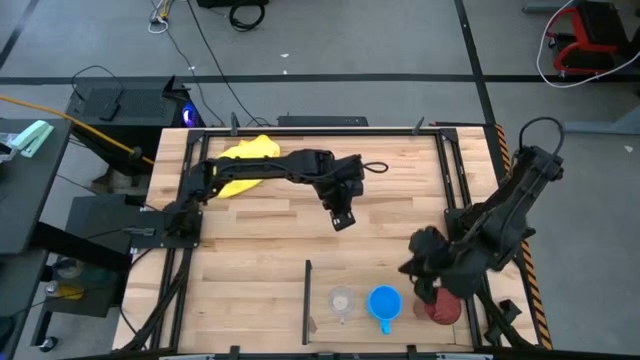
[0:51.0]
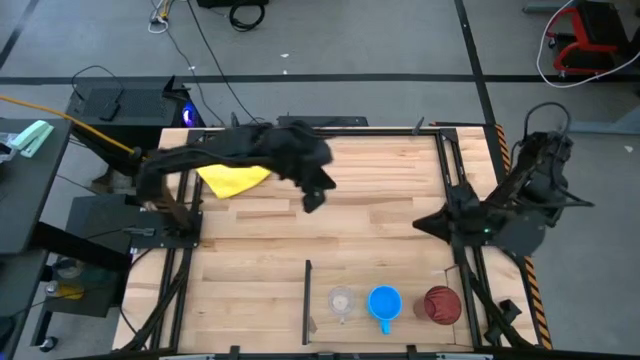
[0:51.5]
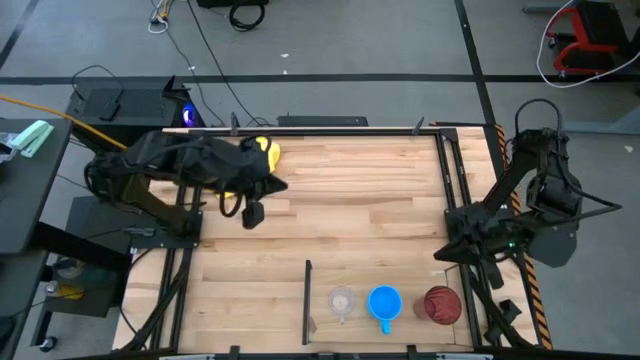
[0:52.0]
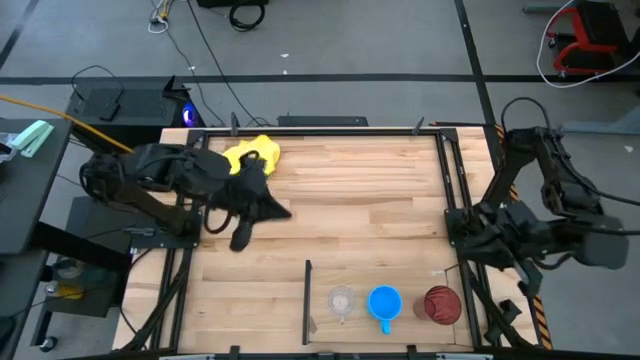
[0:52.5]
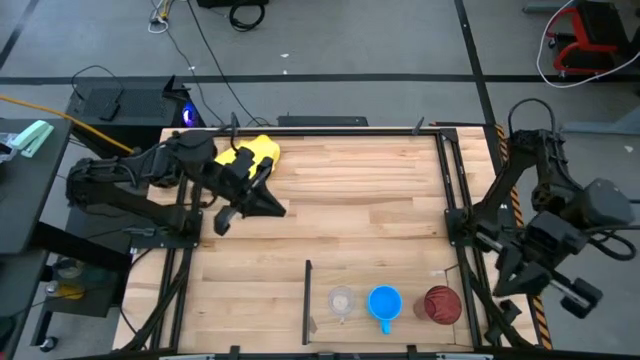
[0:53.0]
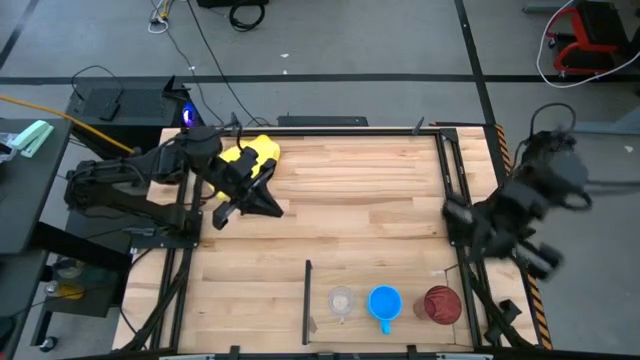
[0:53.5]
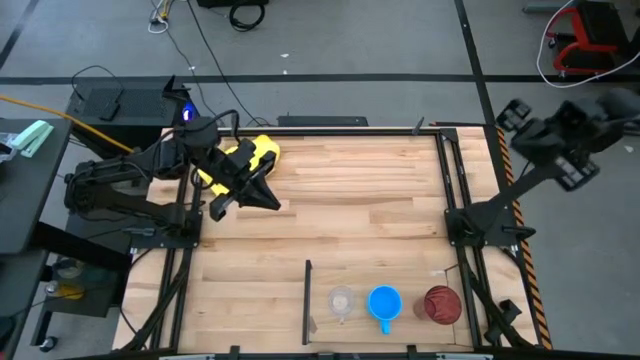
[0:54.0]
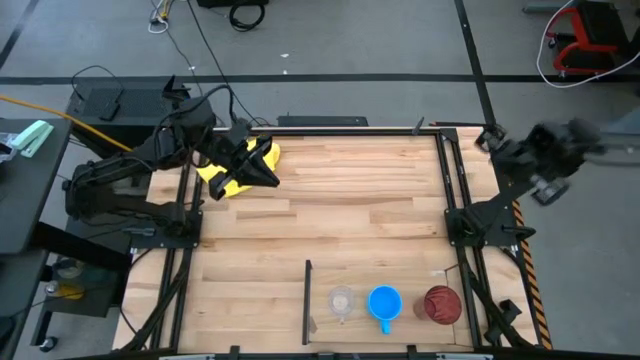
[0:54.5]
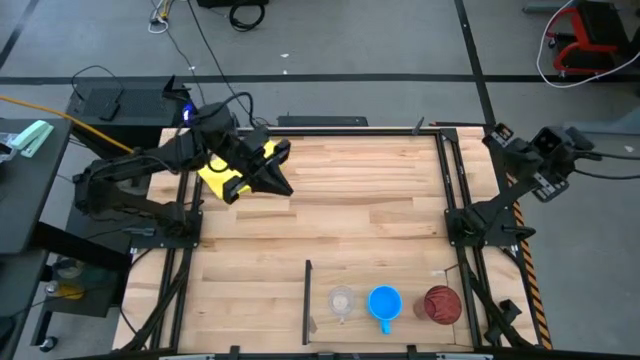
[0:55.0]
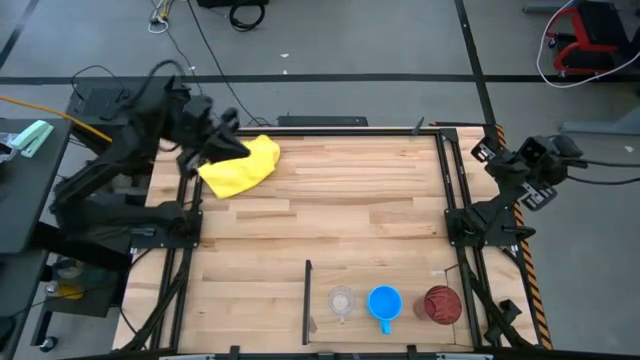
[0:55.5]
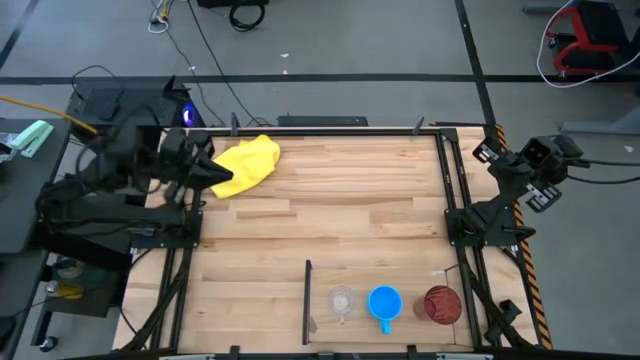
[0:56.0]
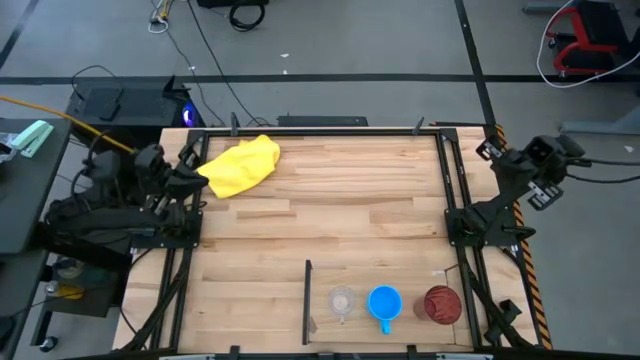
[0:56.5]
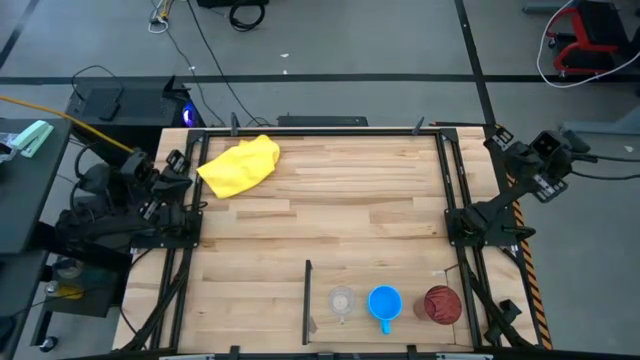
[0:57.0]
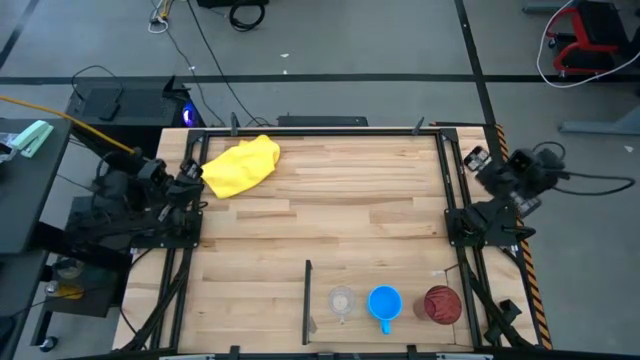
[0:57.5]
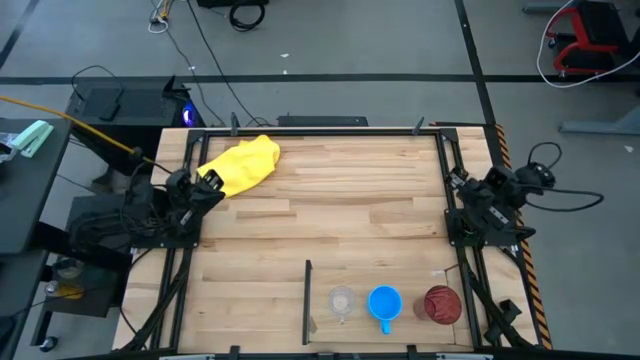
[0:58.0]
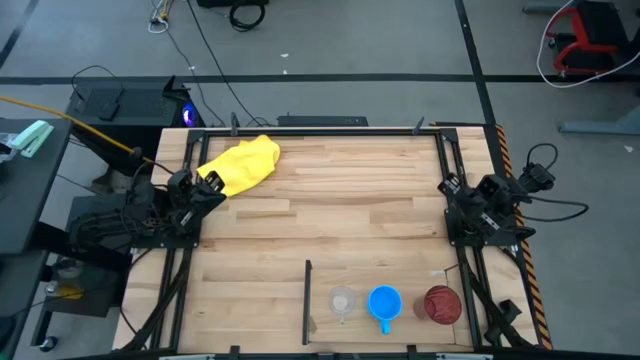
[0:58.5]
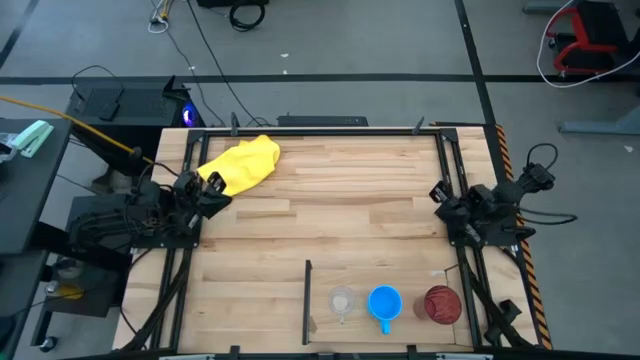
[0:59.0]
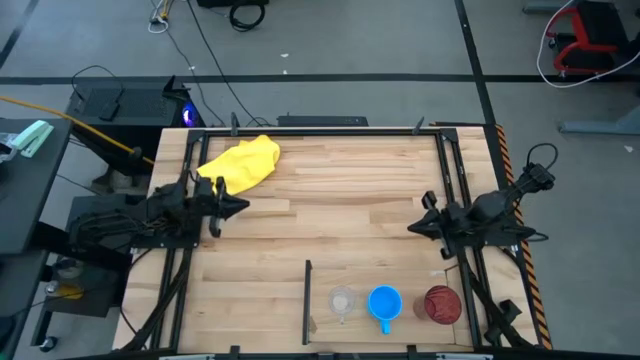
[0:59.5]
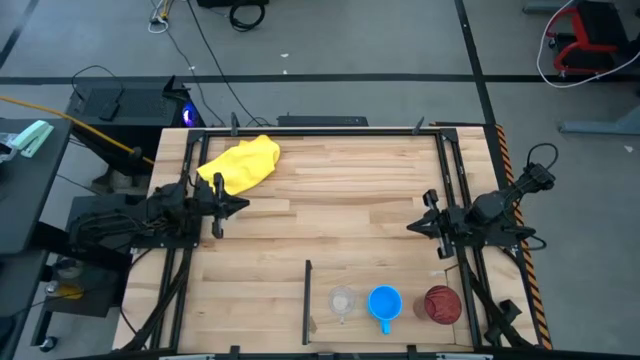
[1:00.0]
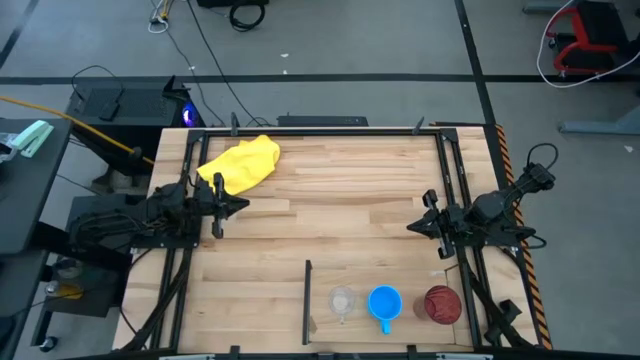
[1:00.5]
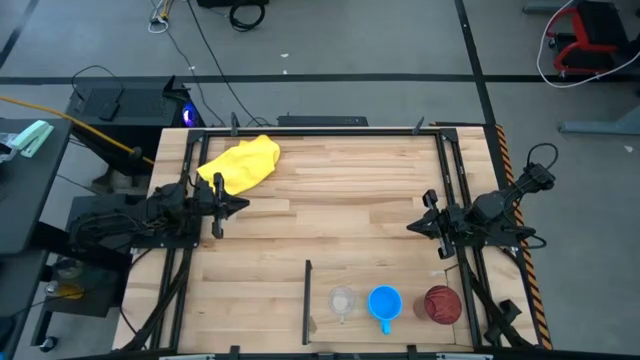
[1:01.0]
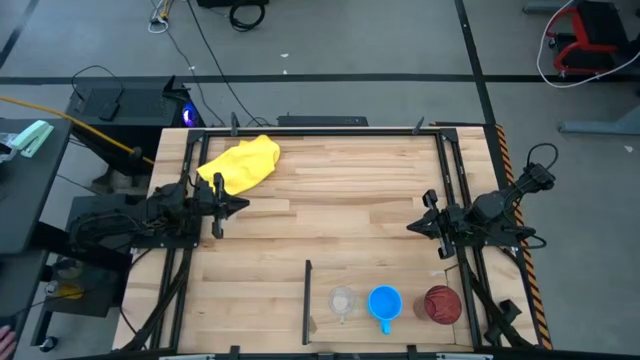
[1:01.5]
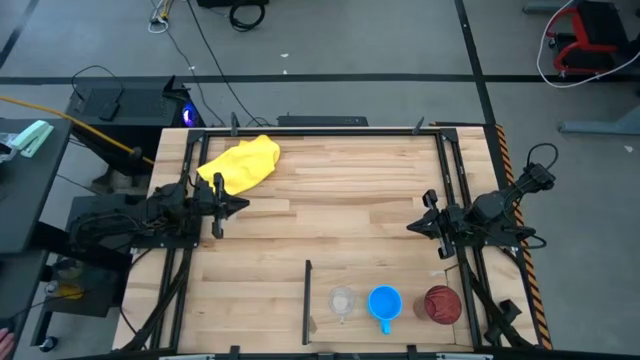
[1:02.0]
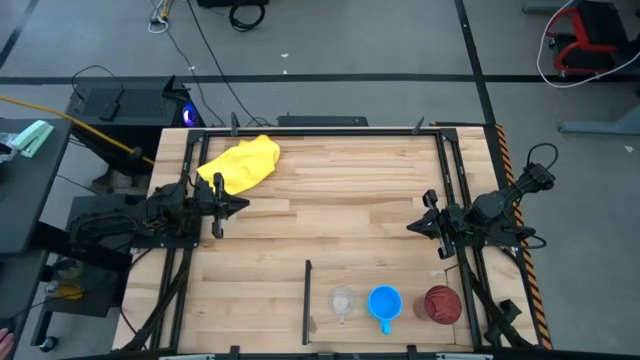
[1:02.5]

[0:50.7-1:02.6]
Task: Stack small to large cups/mugs on shelf
Return to Home Position

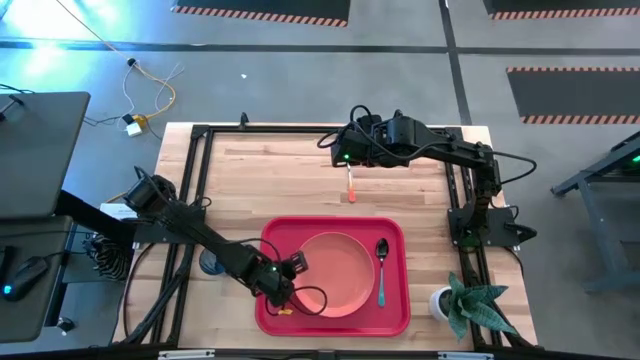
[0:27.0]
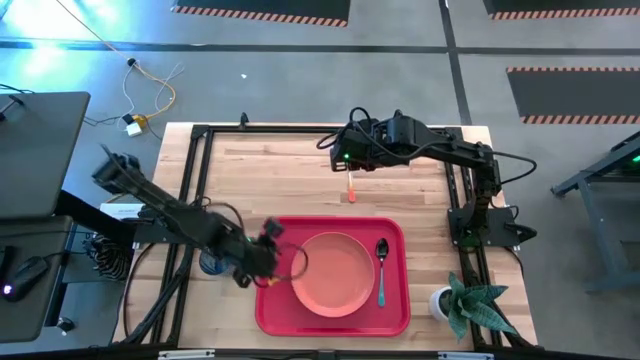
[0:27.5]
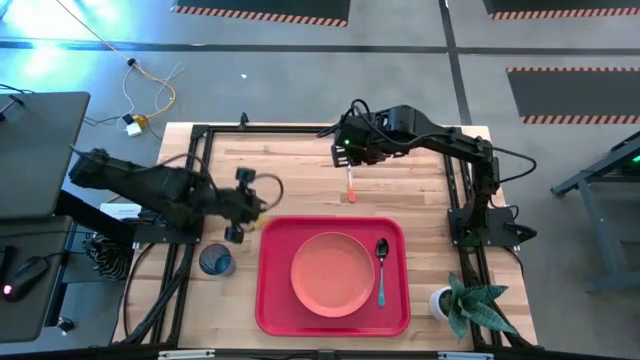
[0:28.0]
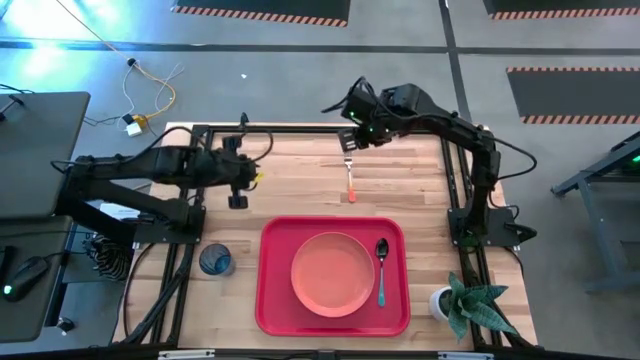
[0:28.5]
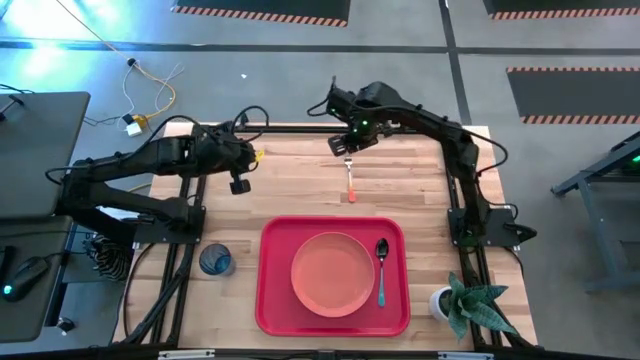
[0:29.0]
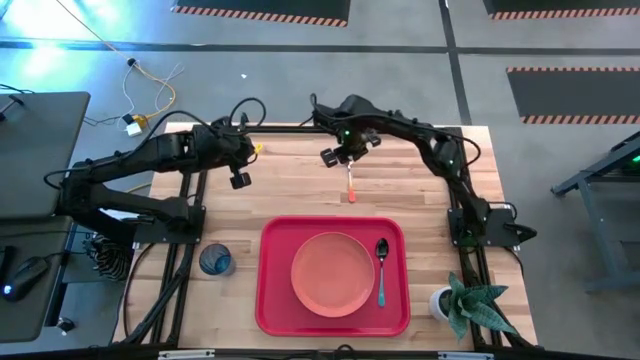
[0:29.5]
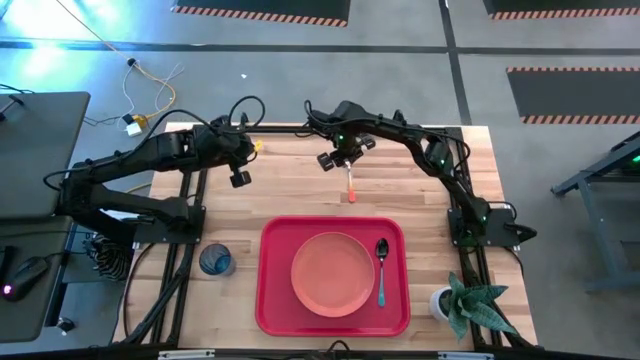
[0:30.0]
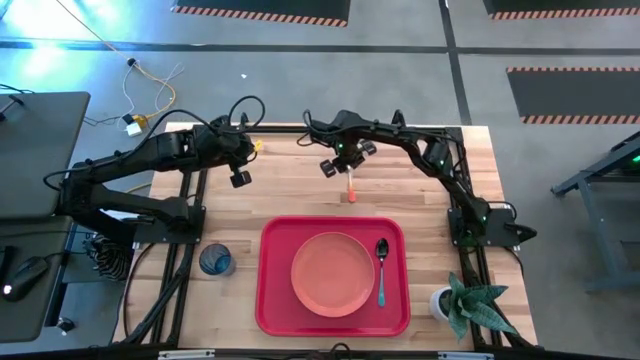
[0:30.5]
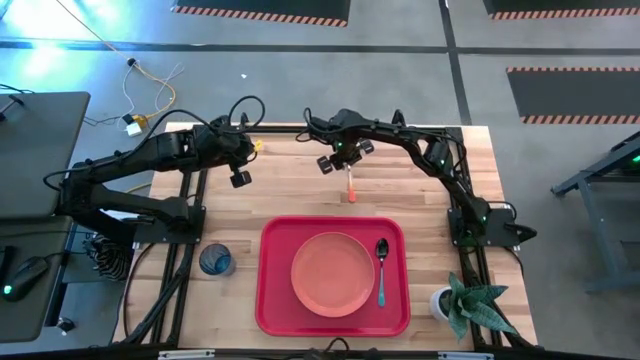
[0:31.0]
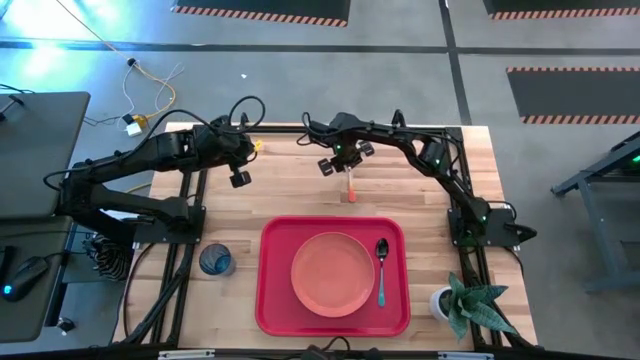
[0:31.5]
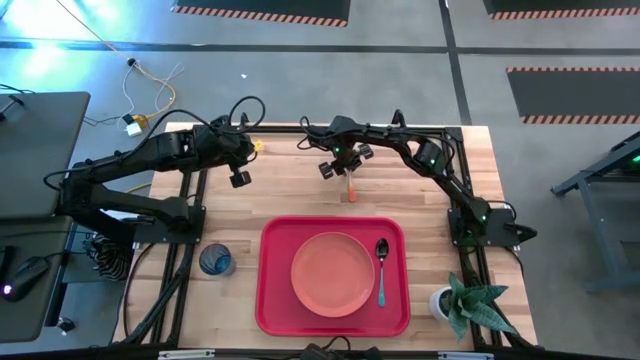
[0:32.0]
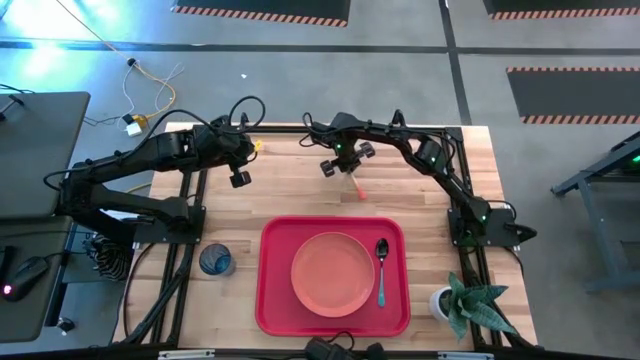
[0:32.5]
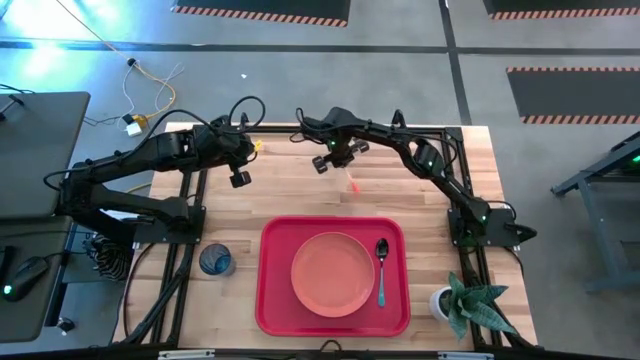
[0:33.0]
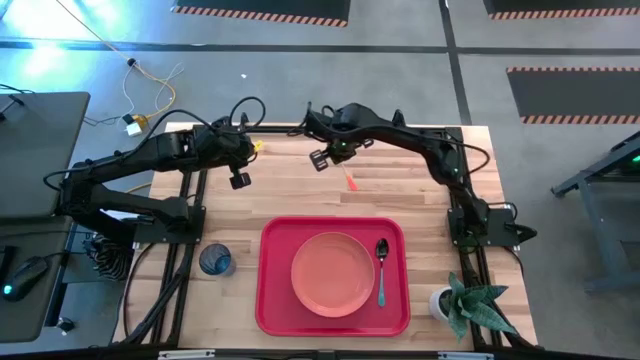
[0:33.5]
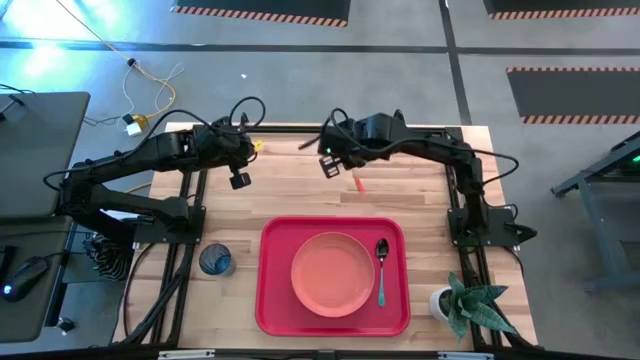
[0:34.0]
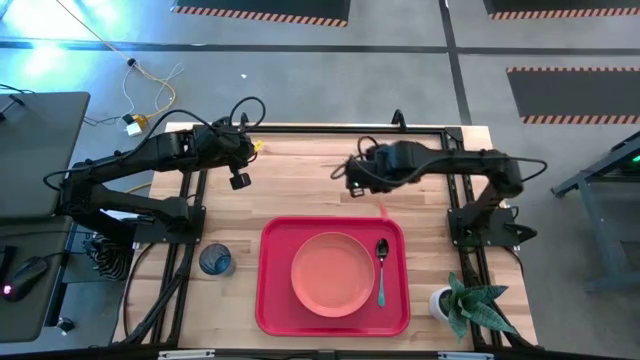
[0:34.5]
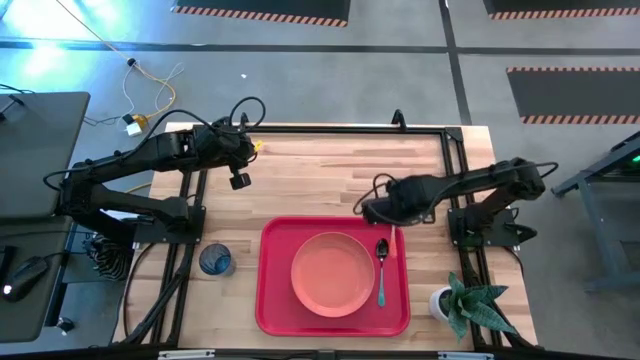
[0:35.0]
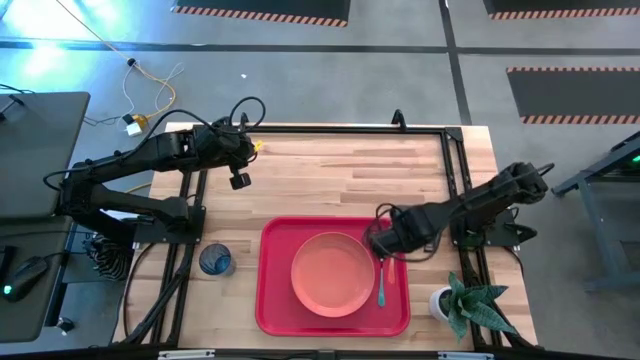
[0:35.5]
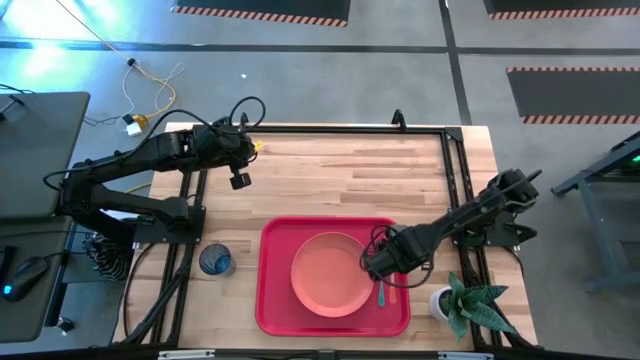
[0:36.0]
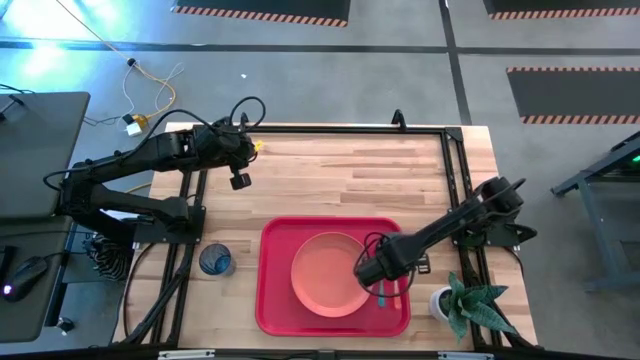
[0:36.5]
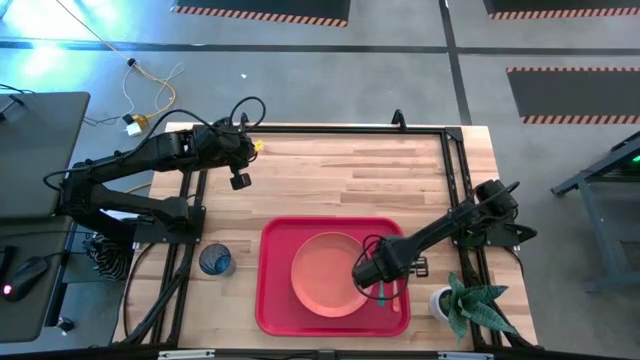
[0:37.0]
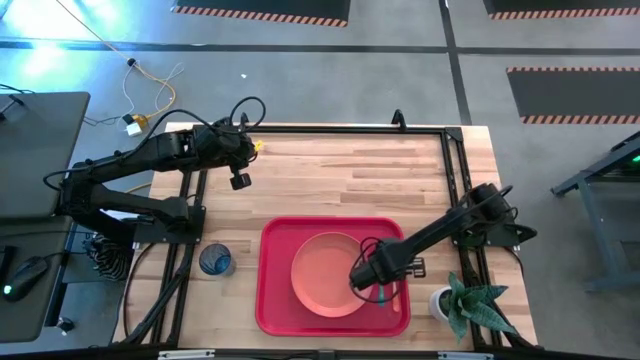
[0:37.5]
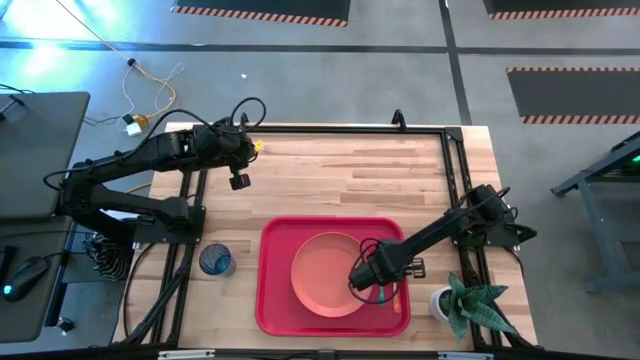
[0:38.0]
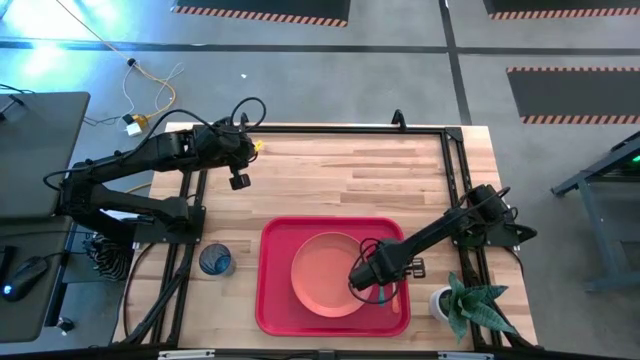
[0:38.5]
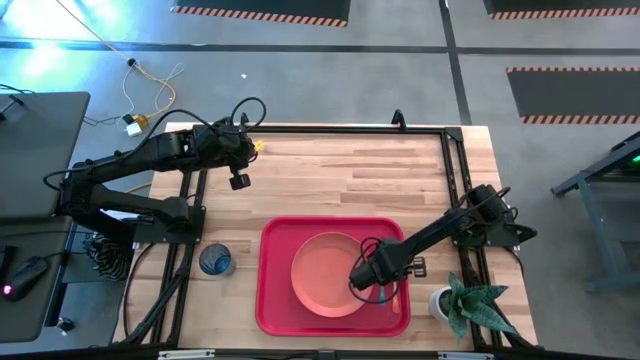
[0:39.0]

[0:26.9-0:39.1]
Task: Pick and place plate/cup/fork/spoon on tray
Put the orange fork on the red tray to the right of the blue spoon
